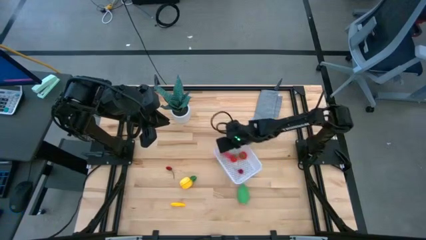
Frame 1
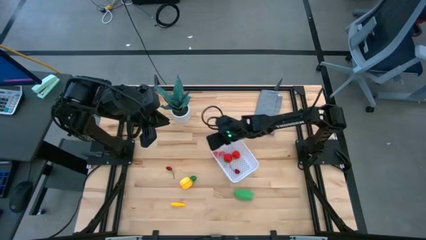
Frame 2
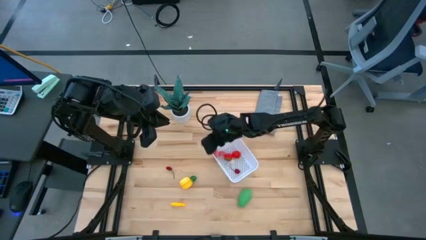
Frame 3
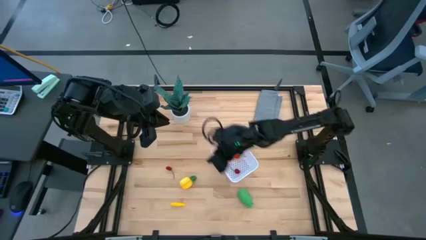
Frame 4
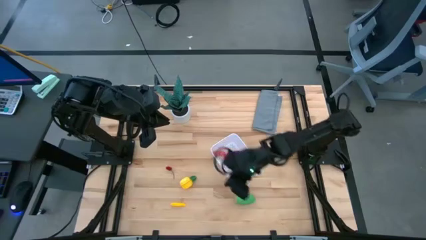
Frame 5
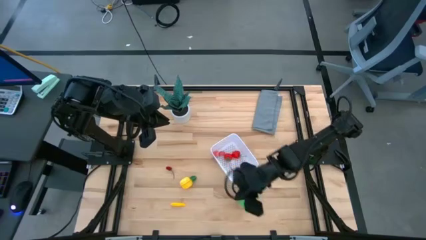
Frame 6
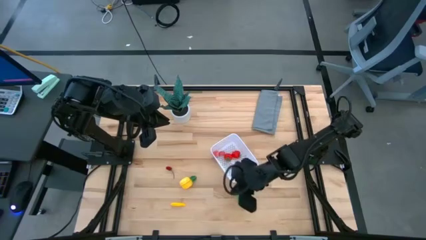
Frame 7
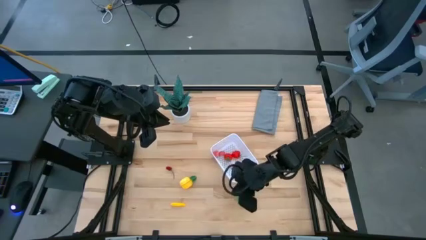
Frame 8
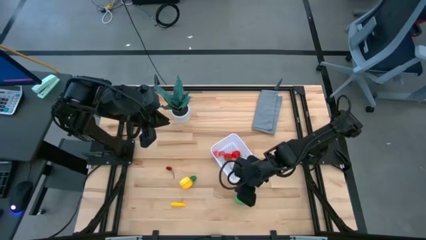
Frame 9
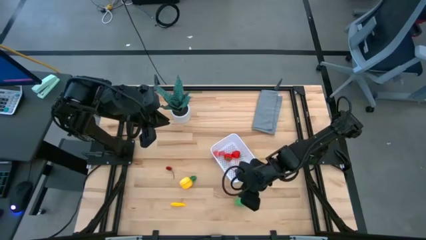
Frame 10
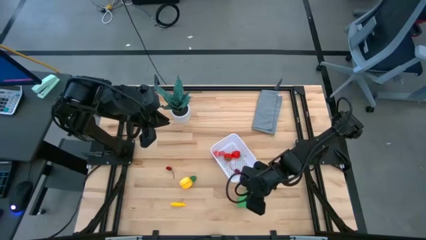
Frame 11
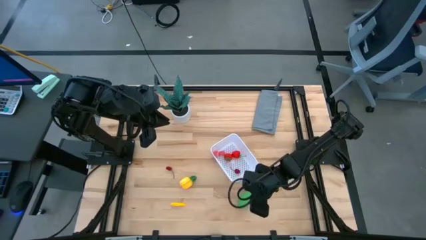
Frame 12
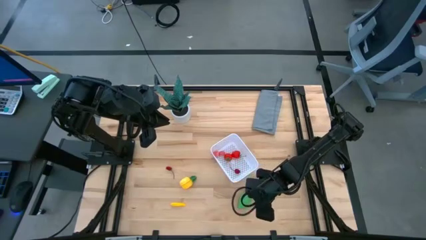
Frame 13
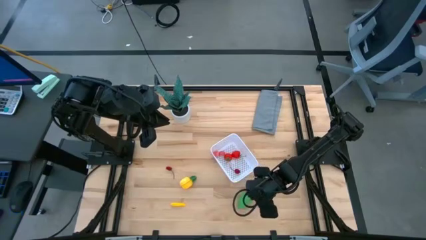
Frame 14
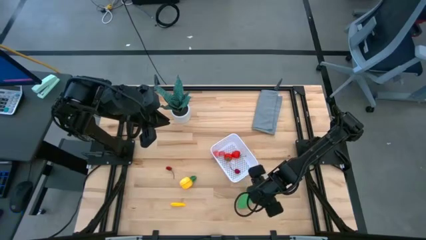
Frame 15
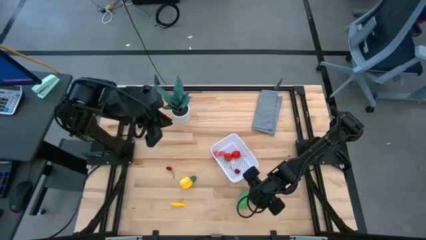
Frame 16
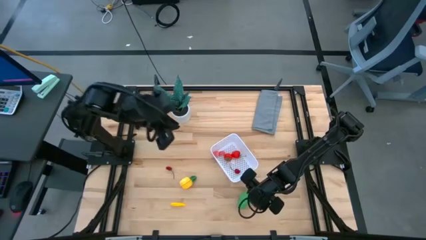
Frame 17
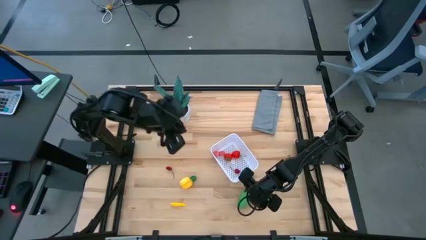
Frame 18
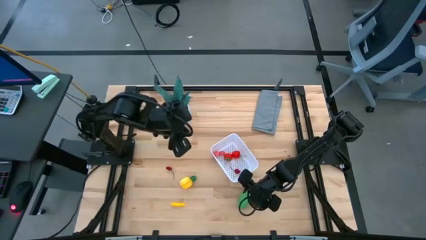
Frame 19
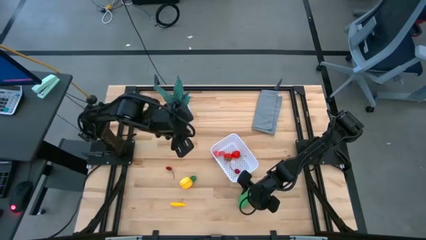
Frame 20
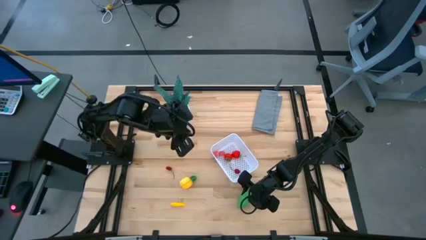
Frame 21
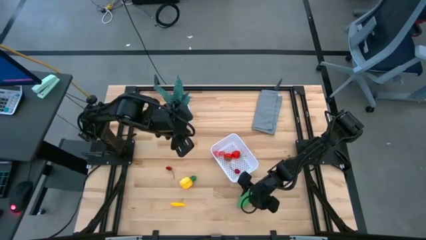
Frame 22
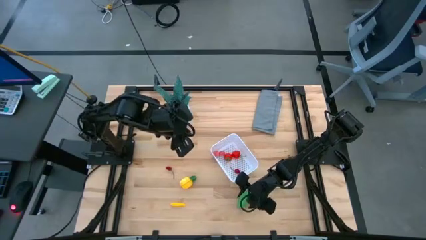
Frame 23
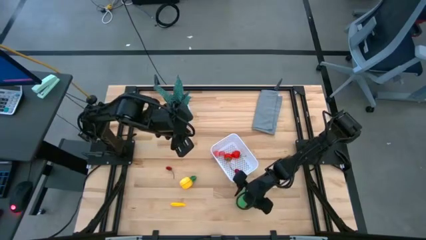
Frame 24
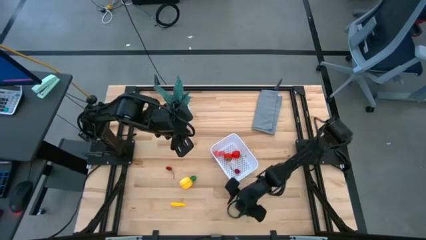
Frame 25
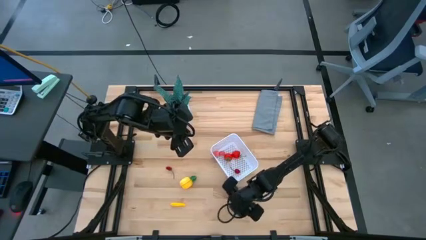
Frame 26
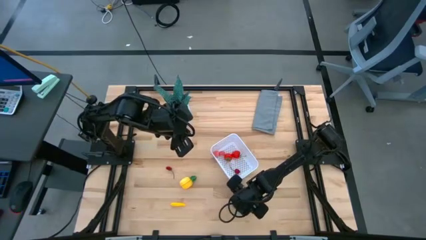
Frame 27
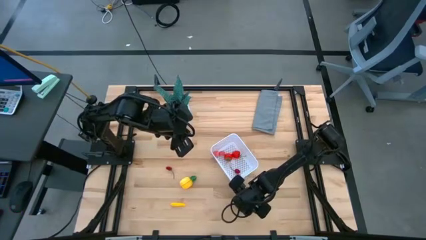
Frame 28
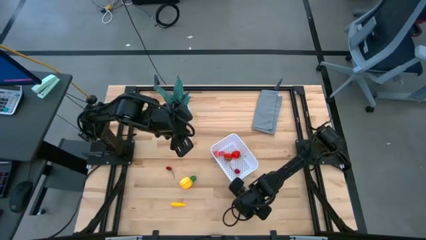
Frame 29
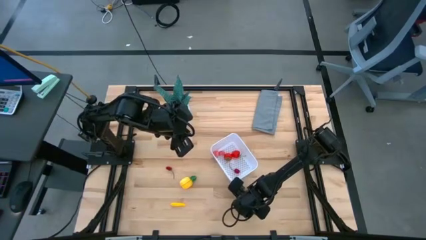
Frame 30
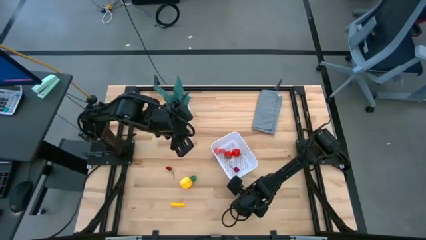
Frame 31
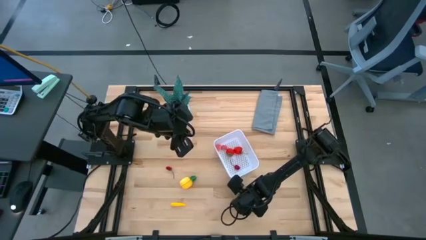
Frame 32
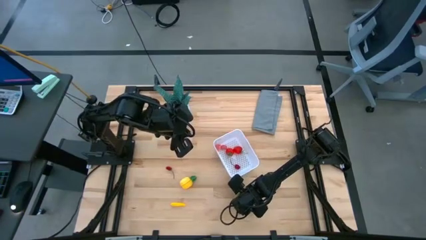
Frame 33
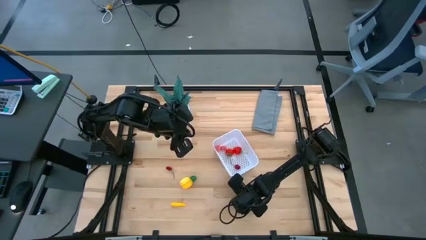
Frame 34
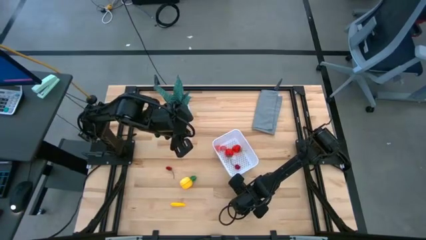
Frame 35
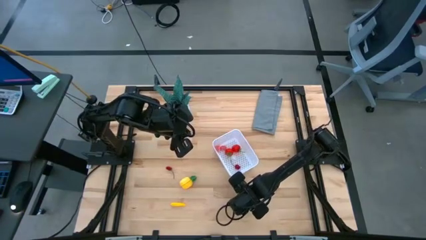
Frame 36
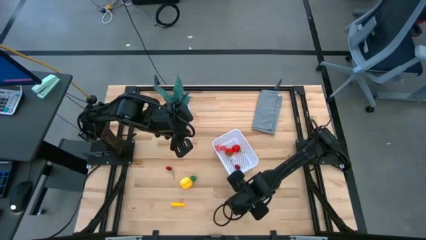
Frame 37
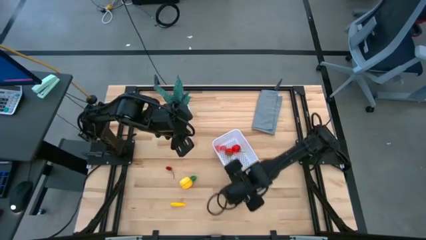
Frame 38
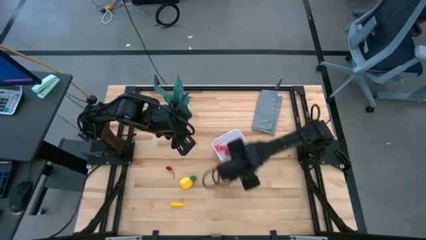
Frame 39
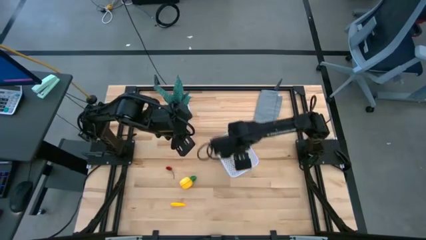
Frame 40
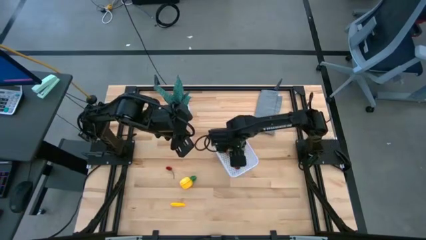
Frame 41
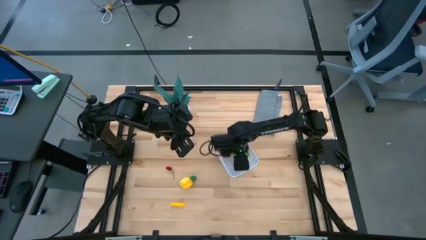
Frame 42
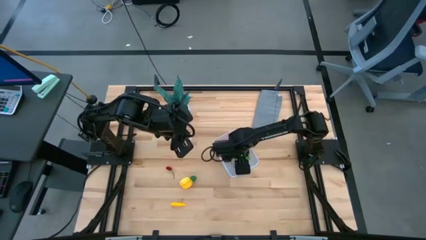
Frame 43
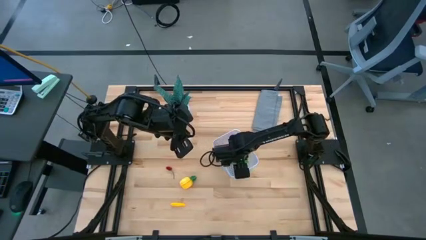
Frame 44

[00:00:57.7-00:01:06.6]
Task: Pick and placing Produce into tupperware
Put the green corn into the white basket

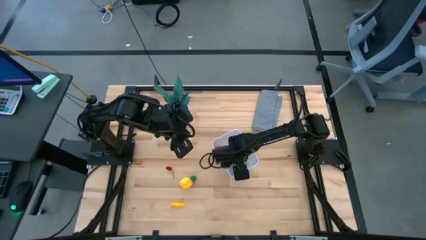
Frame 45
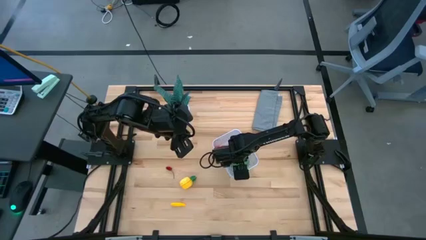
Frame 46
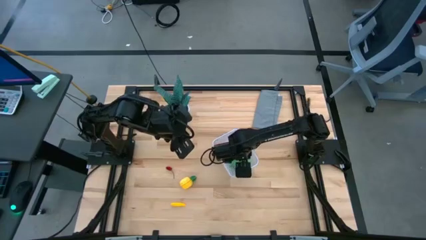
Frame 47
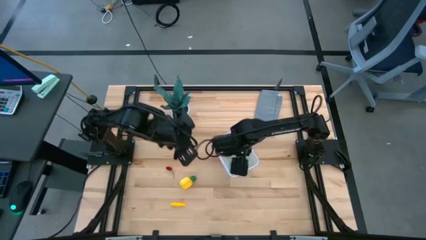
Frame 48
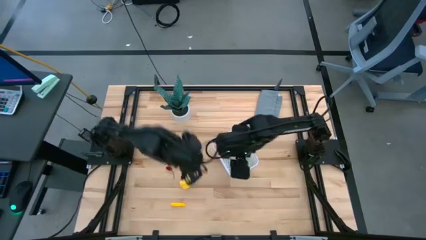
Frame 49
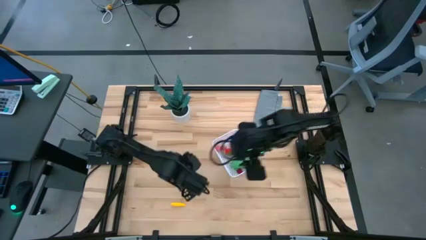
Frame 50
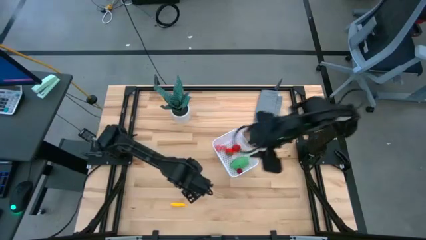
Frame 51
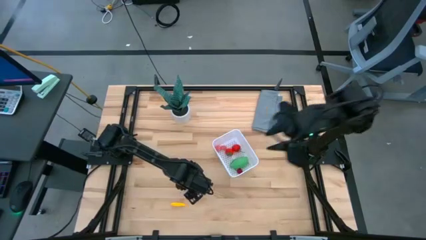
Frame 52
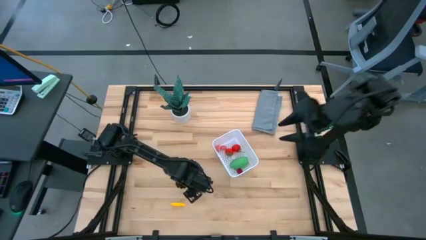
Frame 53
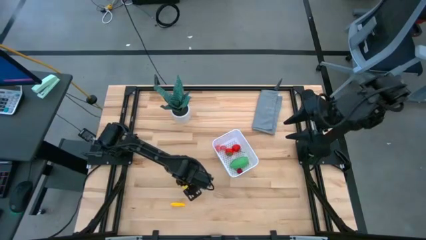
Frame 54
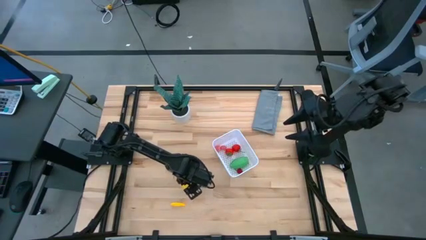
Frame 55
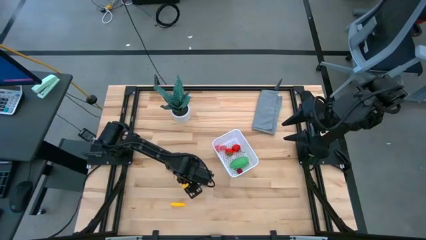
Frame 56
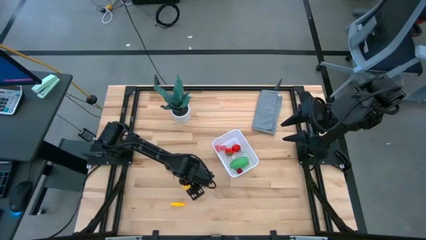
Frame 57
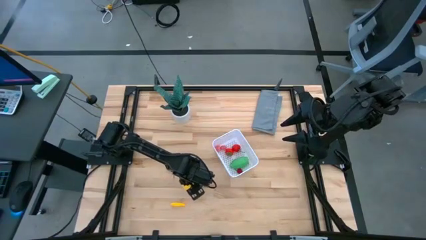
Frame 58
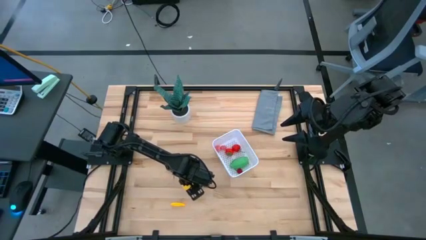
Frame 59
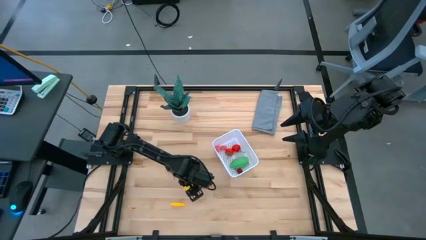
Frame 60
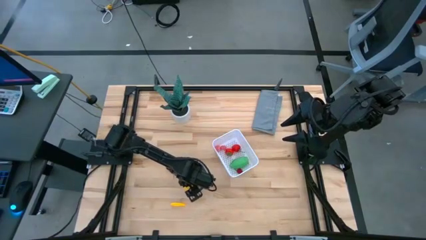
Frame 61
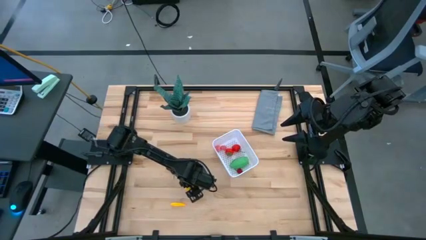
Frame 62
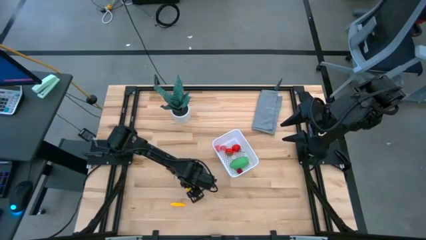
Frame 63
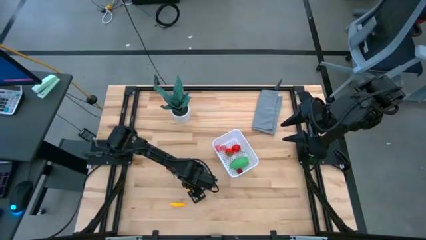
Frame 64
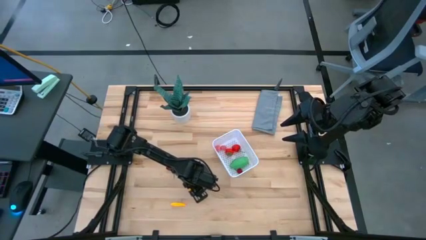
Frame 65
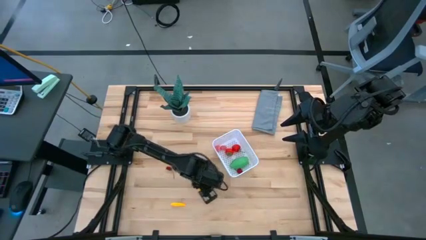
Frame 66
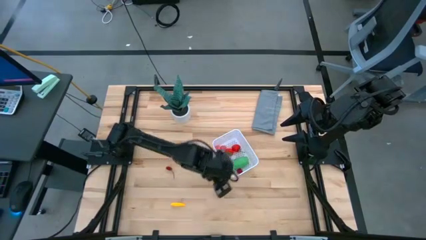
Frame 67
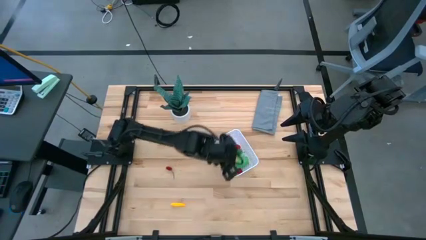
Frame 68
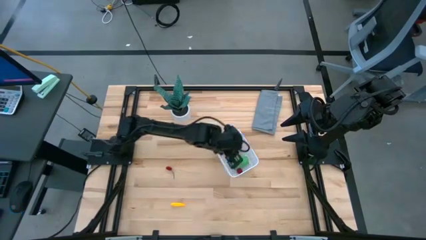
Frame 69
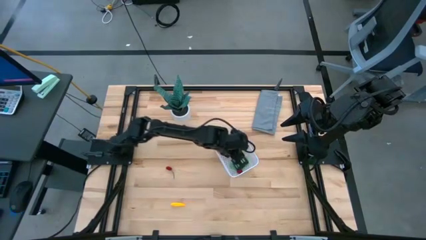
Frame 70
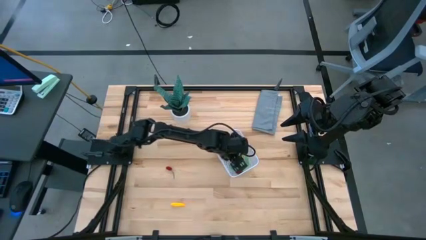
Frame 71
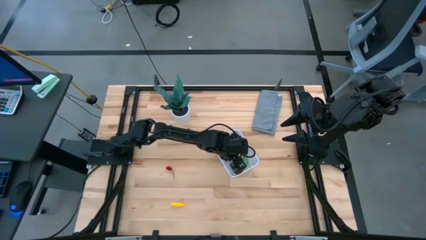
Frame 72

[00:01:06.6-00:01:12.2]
Put the yellow pineapple into the white basket
